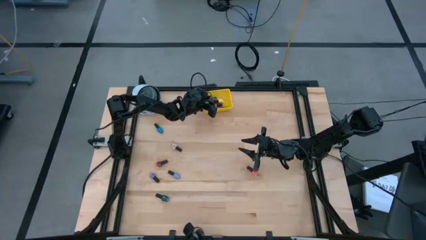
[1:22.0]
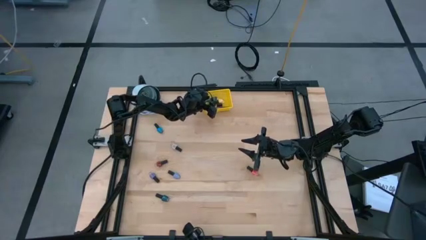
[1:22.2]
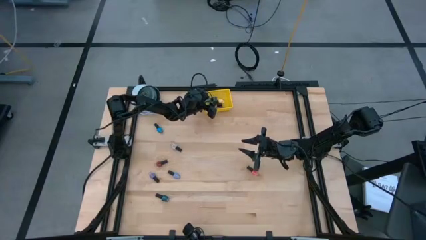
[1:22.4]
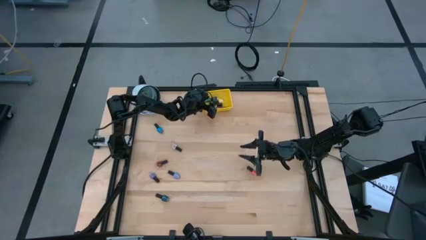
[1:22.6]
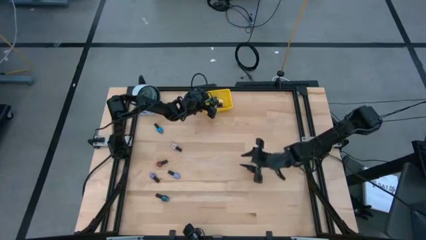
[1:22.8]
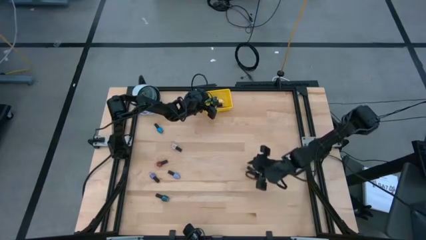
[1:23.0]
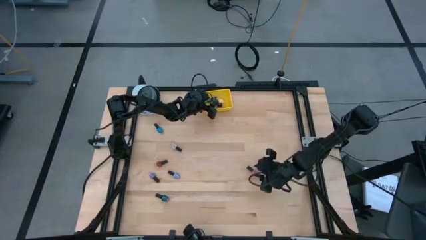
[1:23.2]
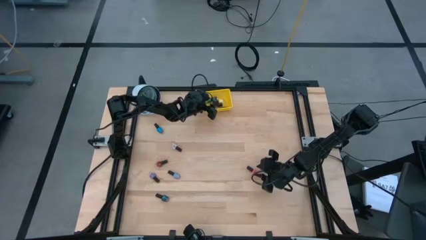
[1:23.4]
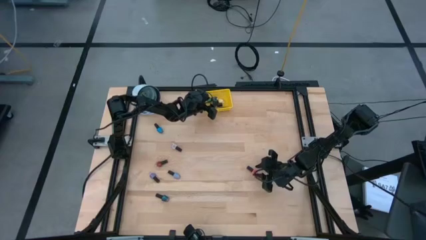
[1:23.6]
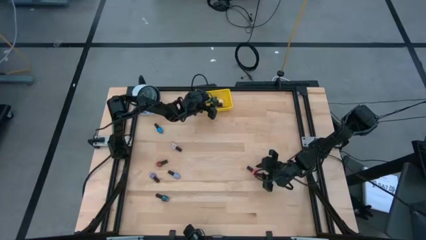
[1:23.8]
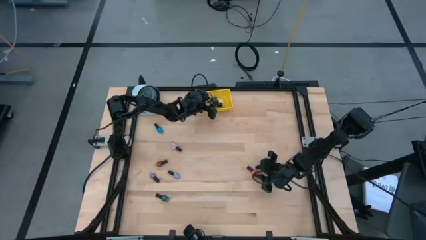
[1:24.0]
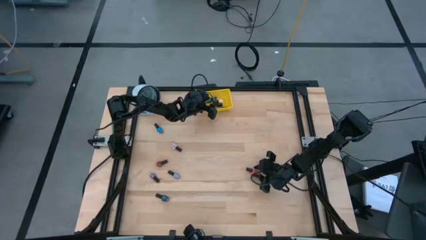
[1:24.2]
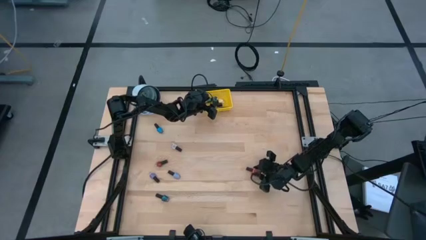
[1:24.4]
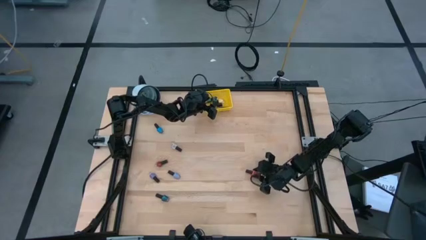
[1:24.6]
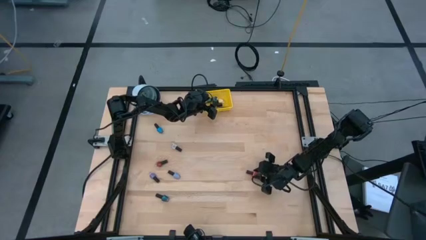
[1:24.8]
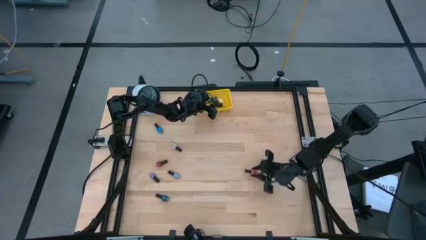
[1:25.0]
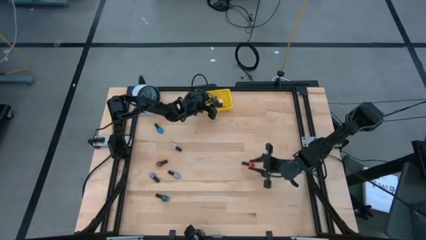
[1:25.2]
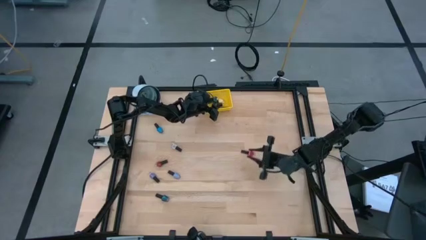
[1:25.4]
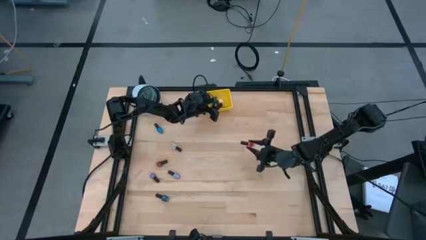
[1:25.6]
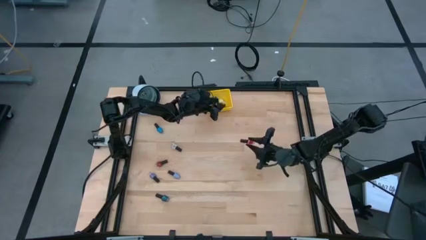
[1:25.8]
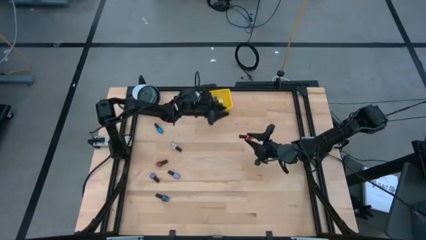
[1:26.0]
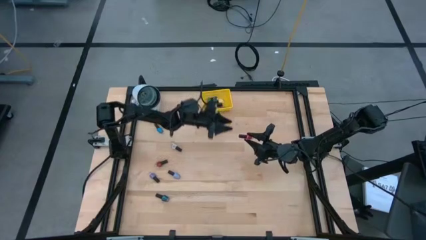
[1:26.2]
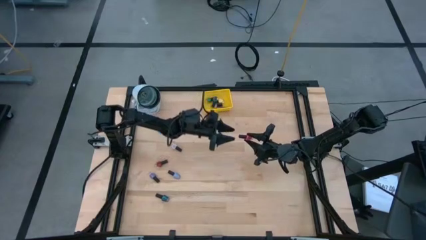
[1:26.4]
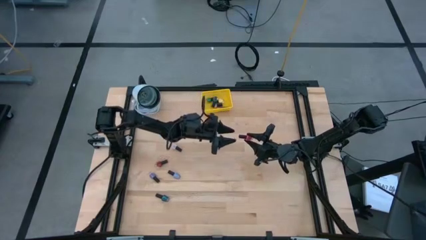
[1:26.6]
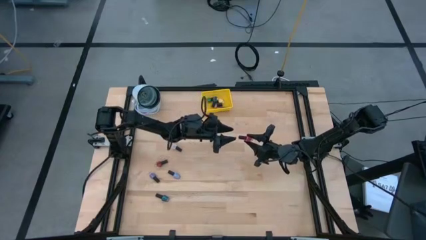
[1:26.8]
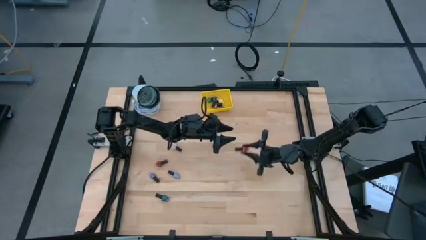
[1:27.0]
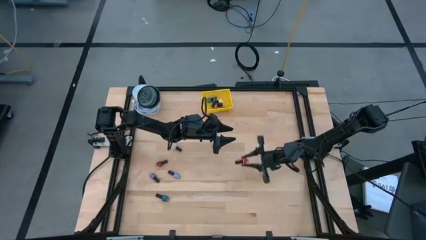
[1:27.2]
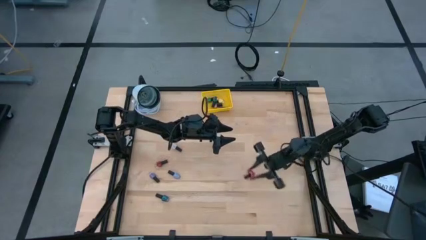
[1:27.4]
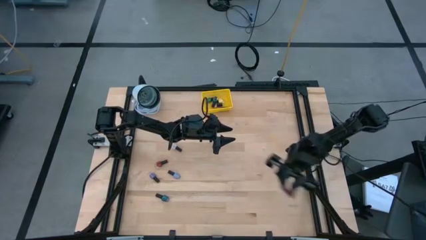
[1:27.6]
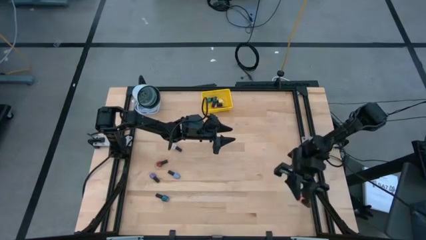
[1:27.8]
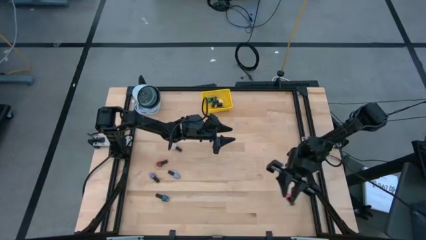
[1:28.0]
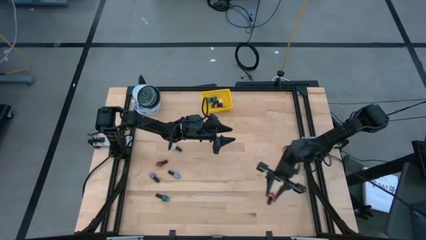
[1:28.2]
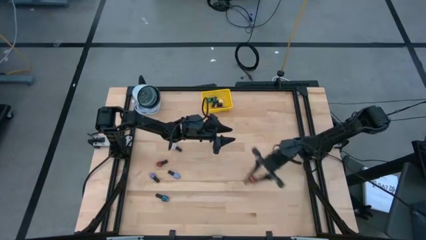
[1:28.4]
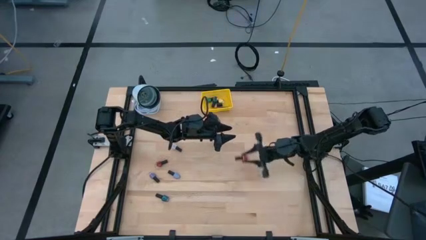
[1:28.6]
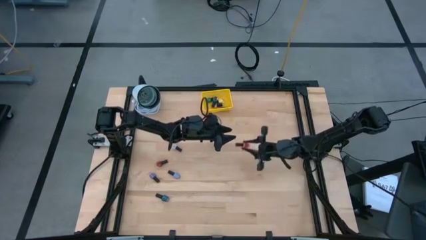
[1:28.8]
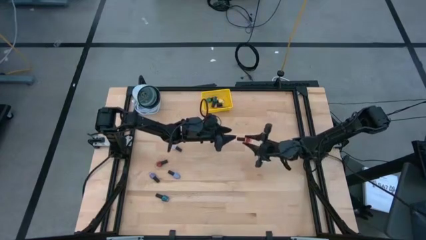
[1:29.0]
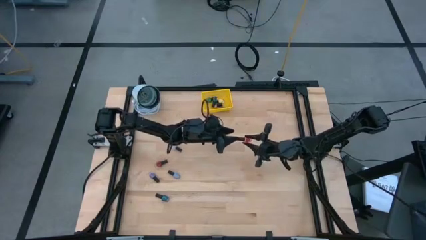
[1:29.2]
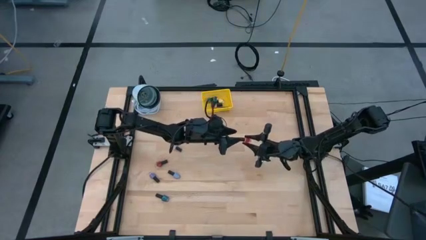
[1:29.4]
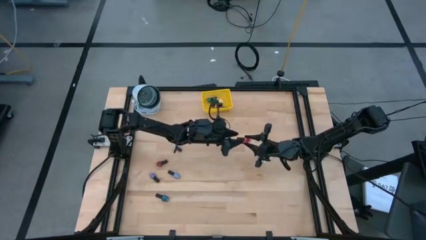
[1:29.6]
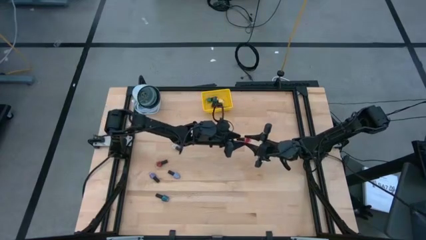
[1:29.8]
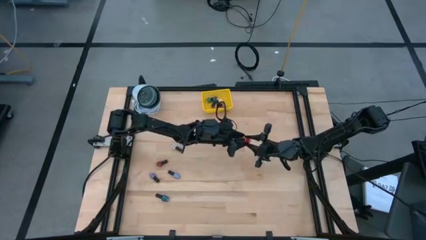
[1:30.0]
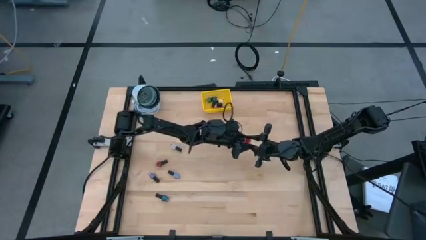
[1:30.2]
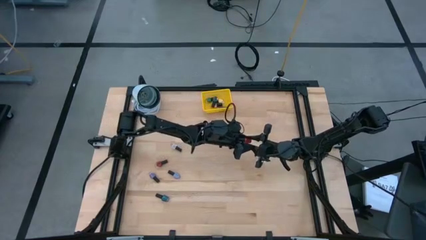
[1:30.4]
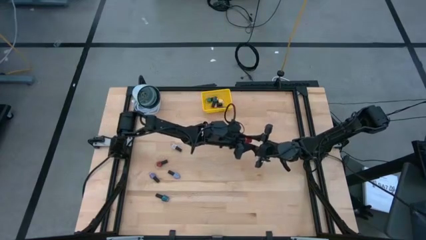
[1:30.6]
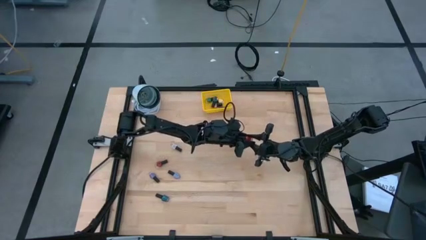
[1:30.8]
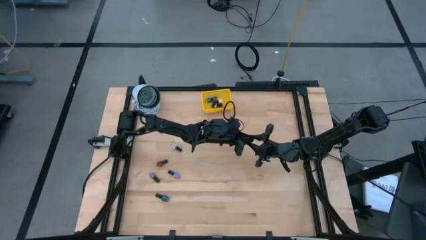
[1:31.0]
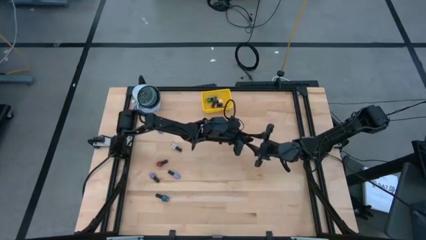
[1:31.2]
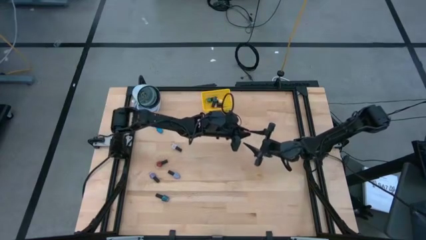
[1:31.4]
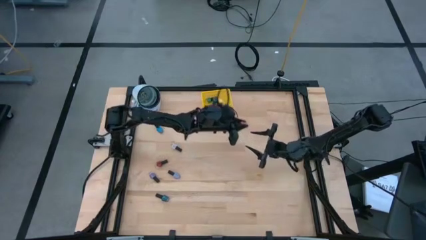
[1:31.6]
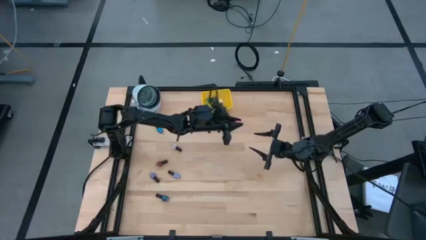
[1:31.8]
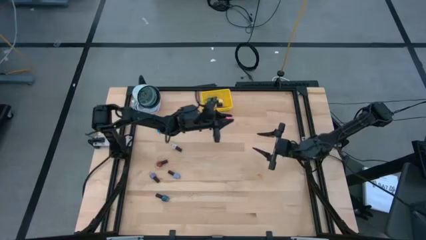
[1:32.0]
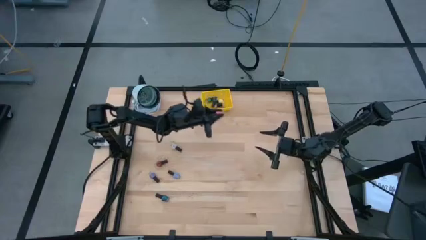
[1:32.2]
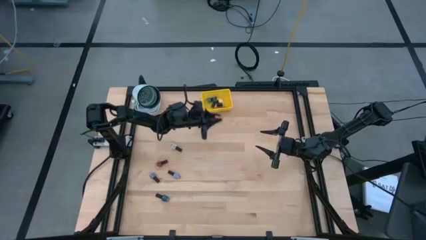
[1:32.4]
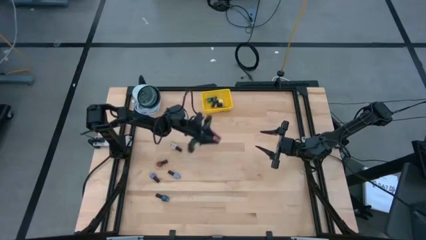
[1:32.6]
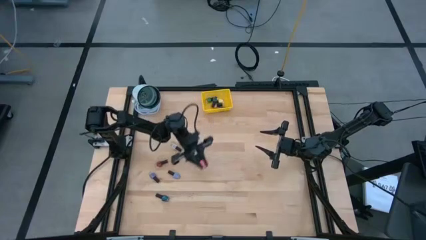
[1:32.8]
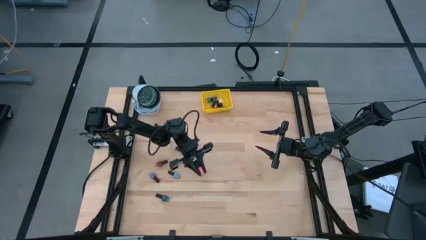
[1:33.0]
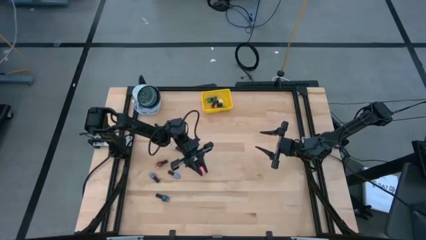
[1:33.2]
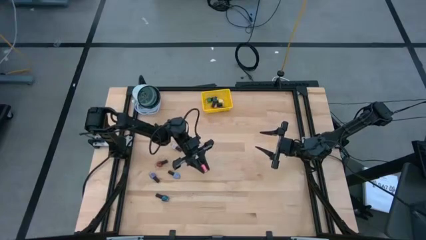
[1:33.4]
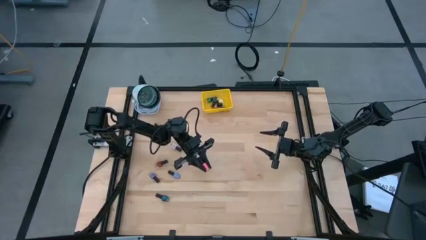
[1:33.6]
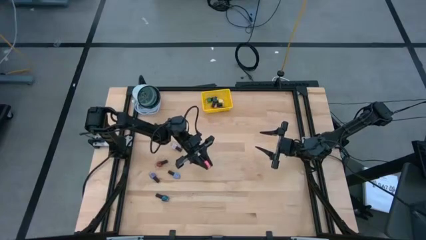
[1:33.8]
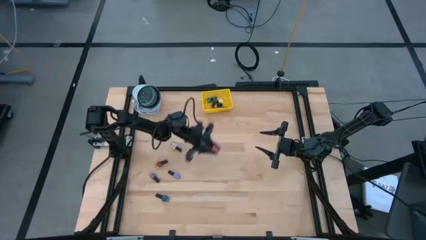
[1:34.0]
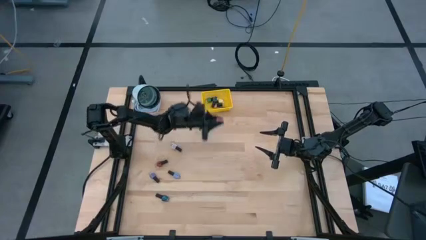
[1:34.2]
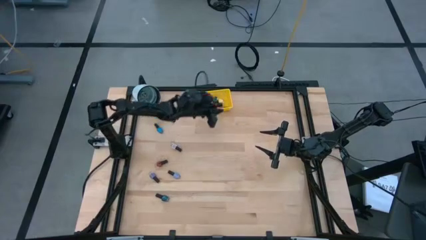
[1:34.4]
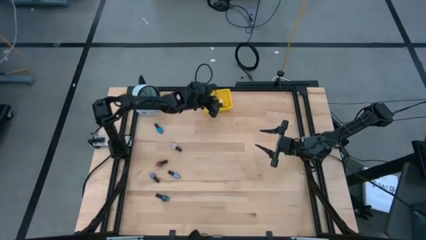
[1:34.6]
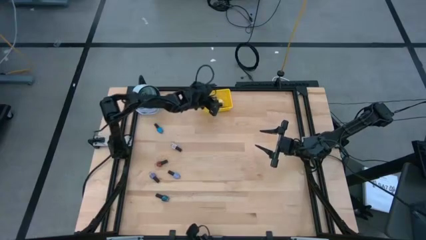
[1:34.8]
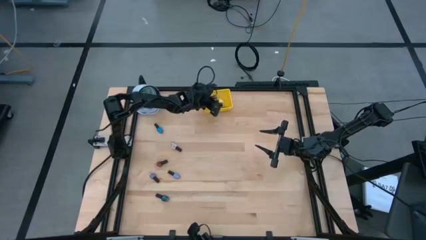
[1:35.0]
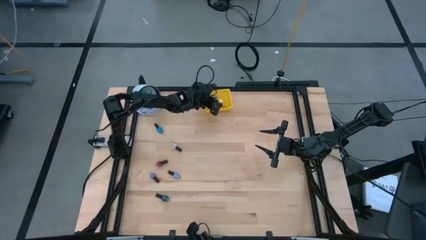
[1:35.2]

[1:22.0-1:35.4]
Task: Pick & Place Nail Polish
Put the pink nail polish bottle into the yellow bin
